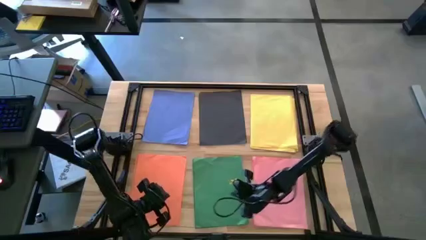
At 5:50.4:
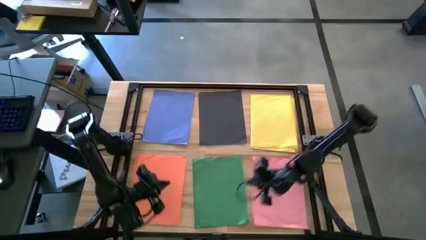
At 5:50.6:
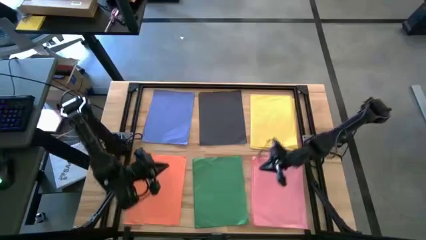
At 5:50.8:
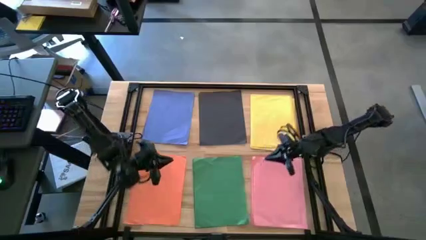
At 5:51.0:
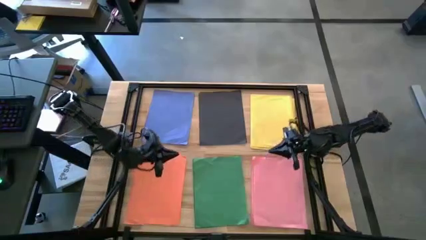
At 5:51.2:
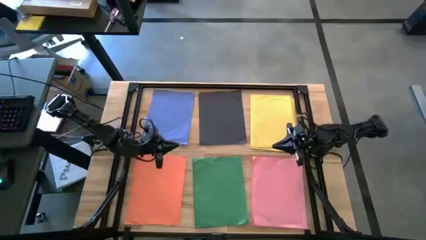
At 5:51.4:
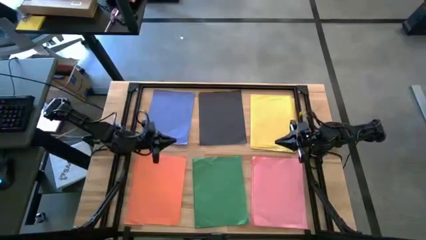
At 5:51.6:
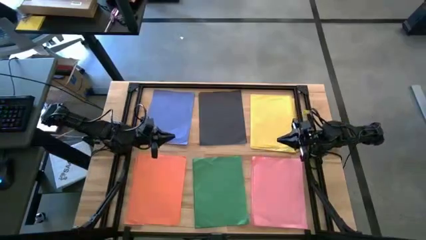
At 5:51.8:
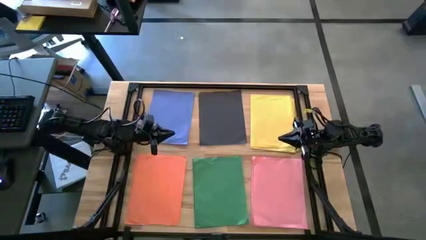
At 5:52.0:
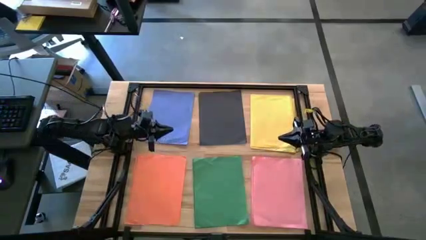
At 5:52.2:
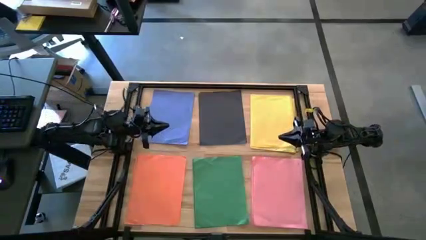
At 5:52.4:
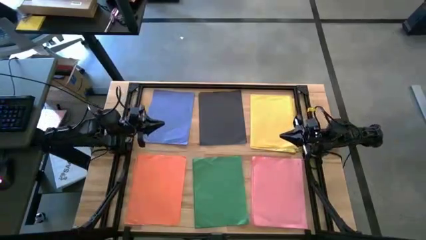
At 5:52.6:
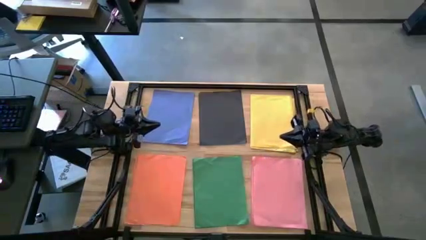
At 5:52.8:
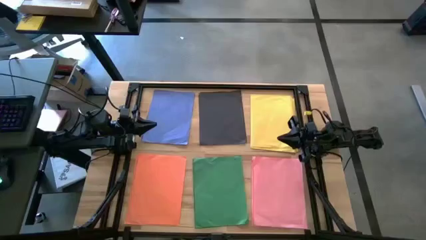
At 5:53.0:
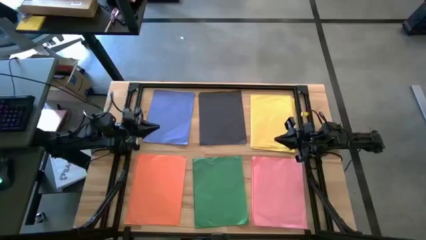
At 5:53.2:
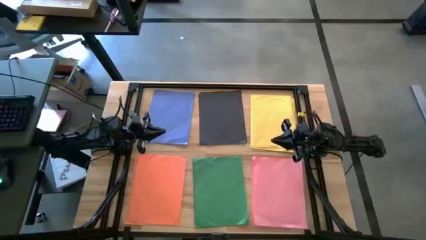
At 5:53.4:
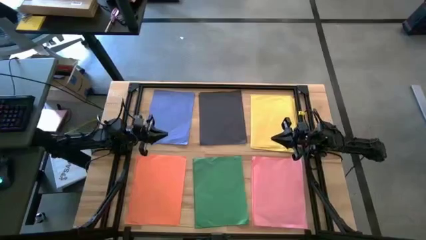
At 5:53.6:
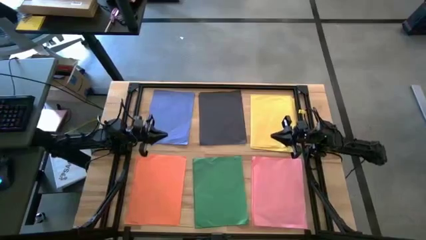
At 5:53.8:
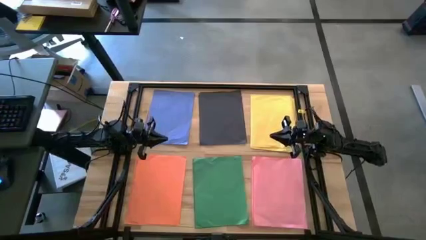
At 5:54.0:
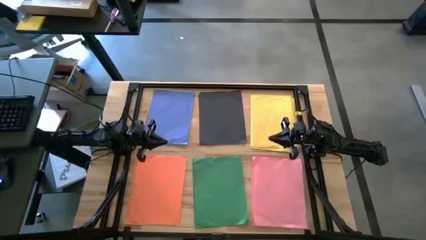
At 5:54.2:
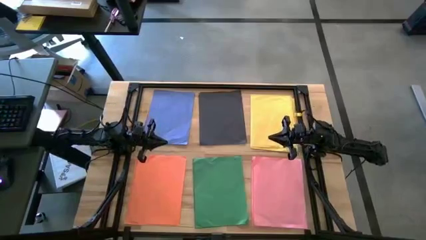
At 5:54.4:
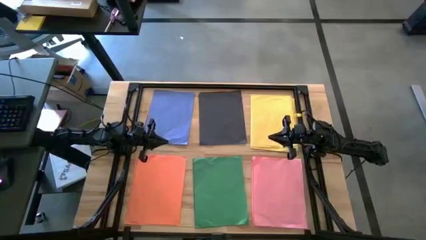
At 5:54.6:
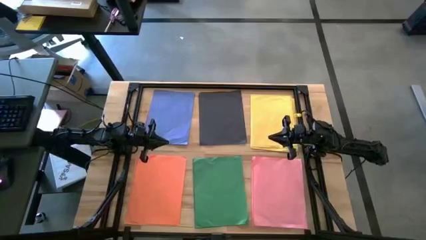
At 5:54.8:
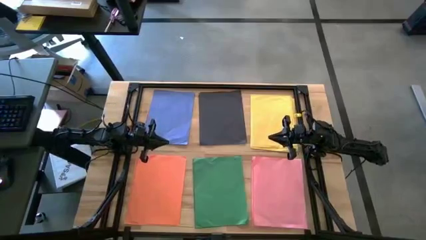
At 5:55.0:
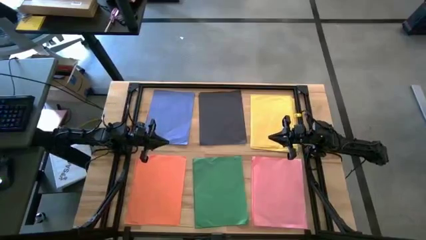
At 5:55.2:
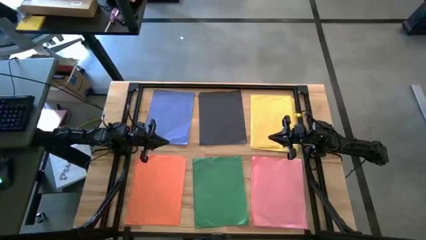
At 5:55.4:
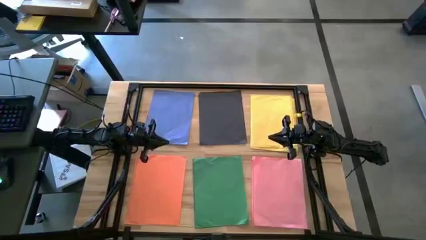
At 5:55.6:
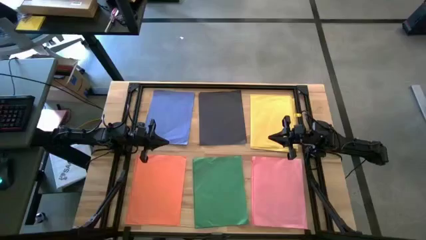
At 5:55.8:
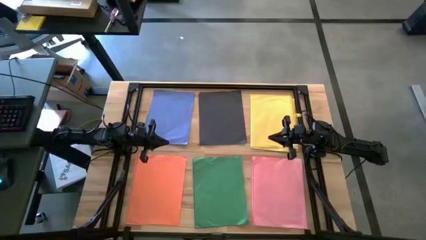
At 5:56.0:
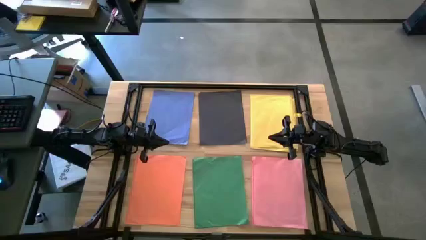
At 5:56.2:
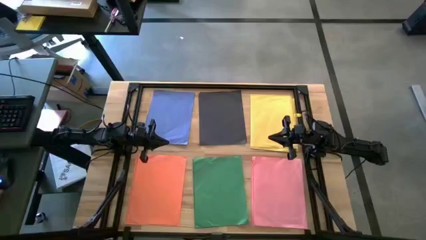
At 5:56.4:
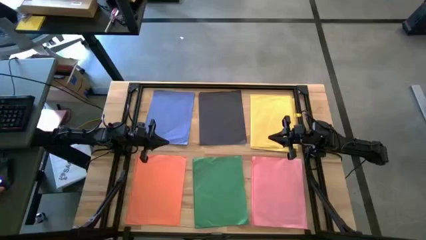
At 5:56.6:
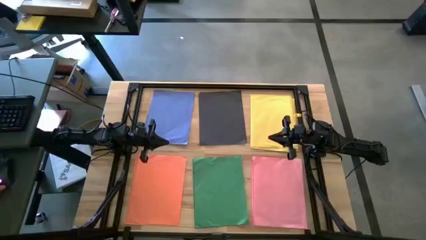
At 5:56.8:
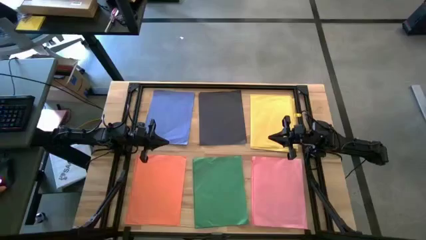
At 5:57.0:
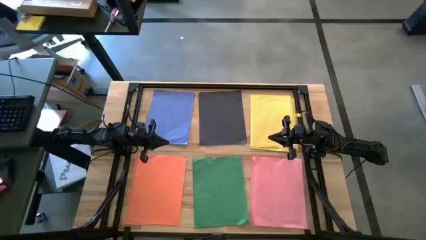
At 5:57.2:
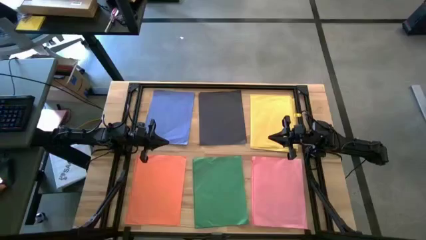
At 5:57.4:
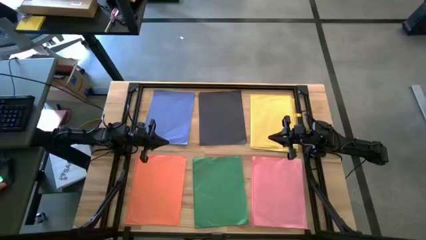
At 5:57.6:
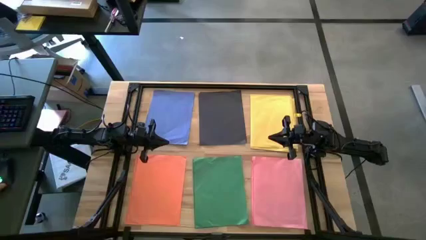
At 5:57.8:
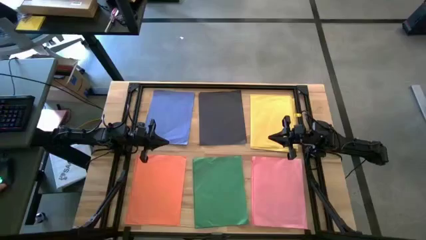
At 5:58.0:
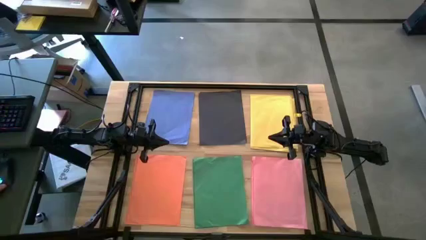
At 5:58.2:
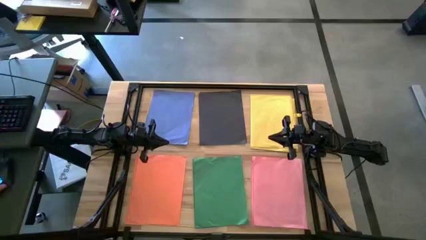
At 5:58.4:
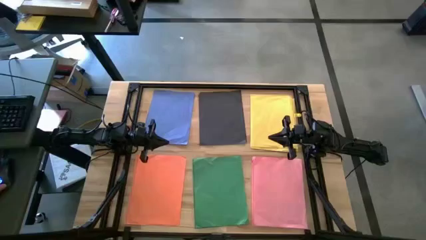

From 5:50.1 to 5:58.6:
Task: Organize paper
Return to Home Position
